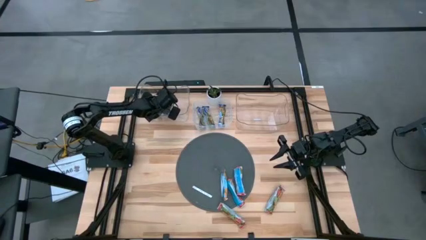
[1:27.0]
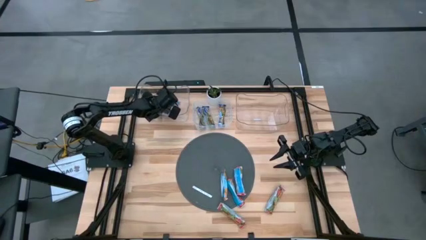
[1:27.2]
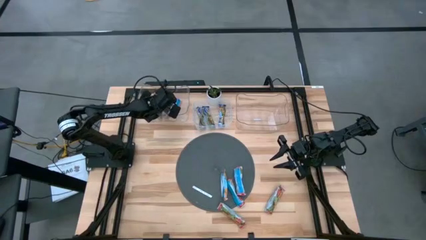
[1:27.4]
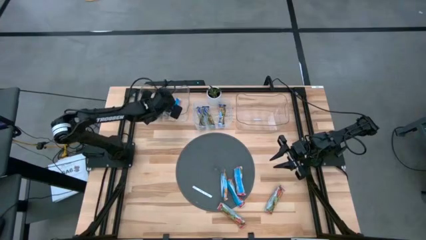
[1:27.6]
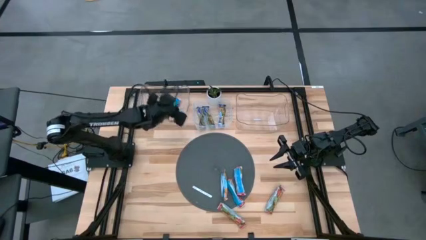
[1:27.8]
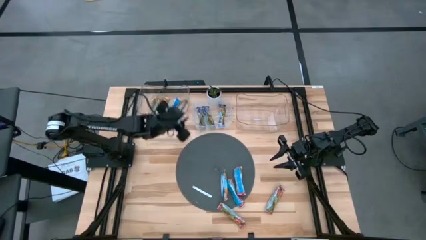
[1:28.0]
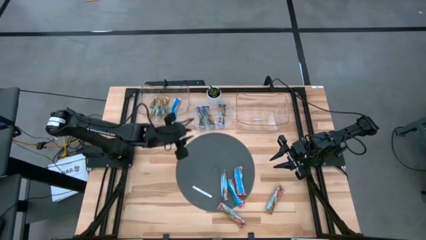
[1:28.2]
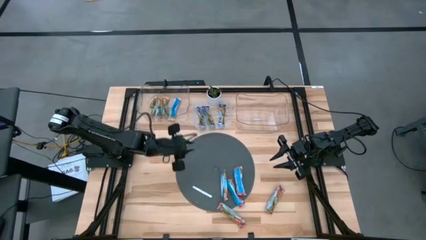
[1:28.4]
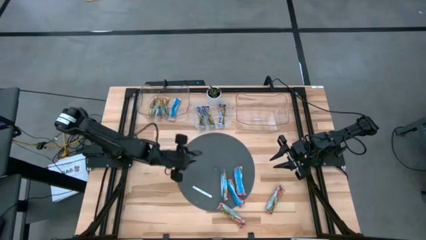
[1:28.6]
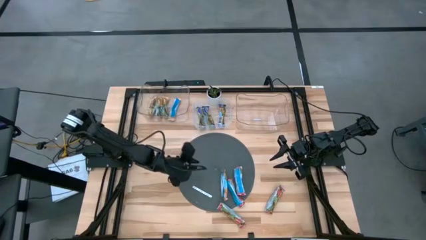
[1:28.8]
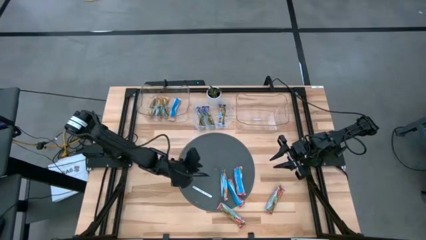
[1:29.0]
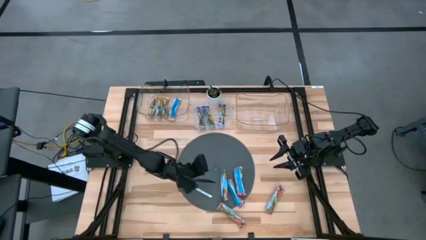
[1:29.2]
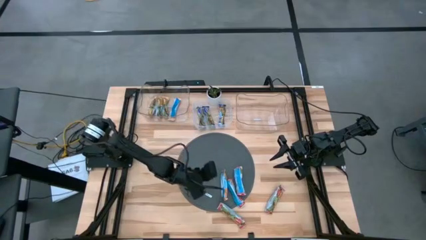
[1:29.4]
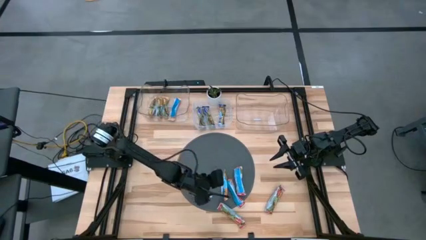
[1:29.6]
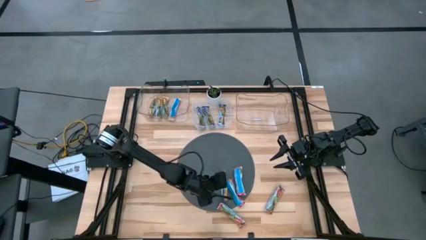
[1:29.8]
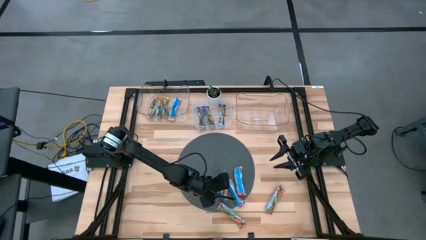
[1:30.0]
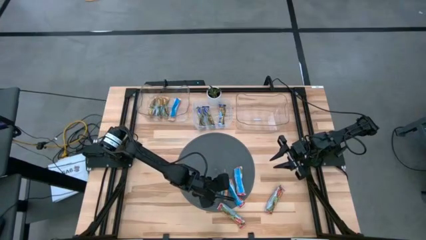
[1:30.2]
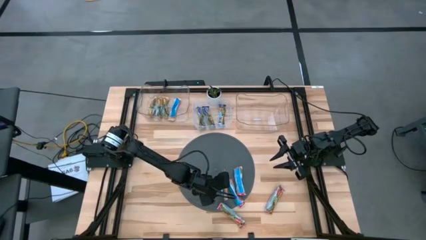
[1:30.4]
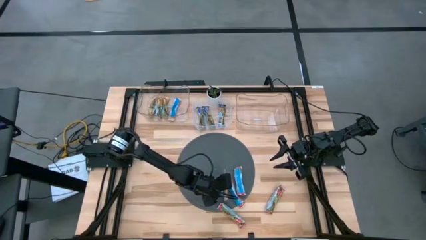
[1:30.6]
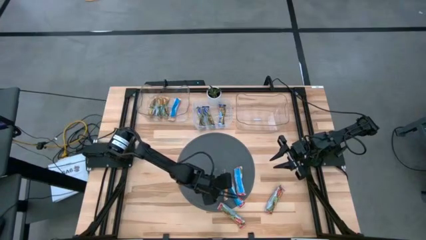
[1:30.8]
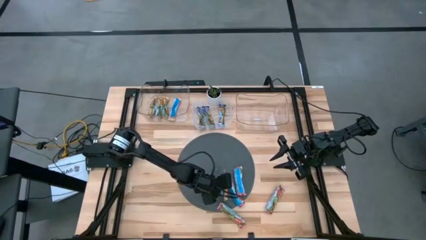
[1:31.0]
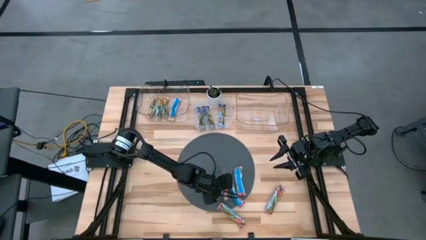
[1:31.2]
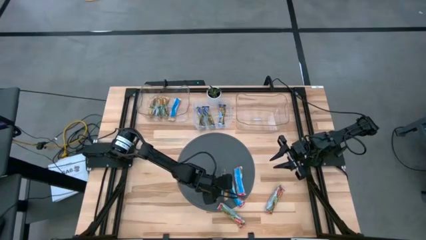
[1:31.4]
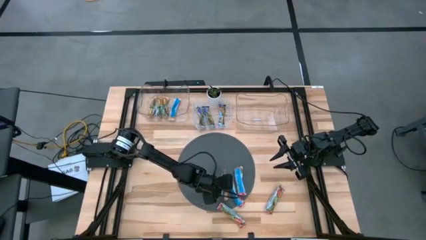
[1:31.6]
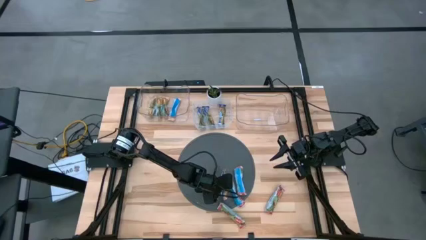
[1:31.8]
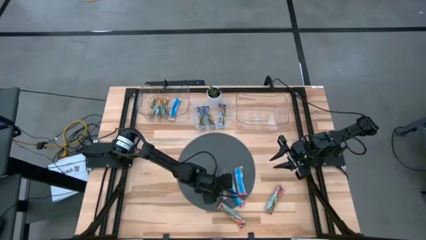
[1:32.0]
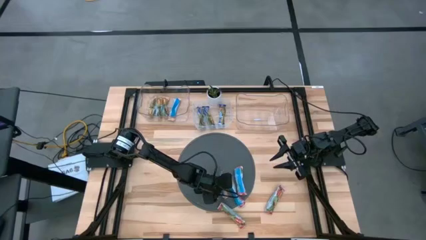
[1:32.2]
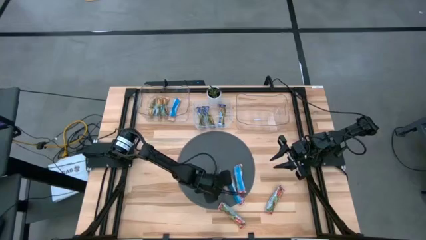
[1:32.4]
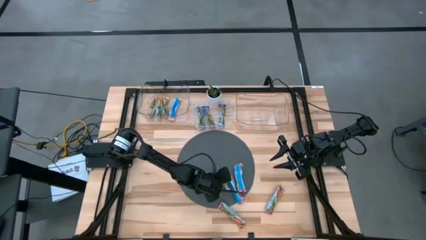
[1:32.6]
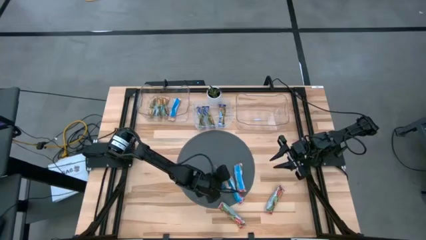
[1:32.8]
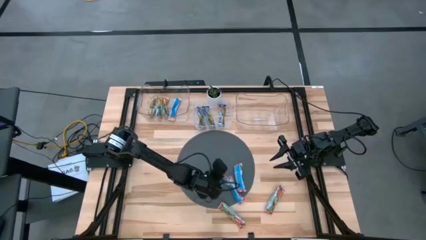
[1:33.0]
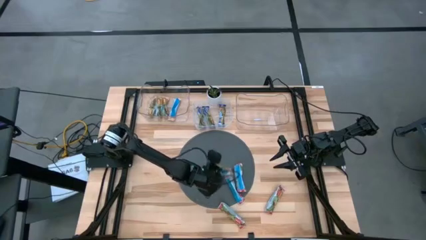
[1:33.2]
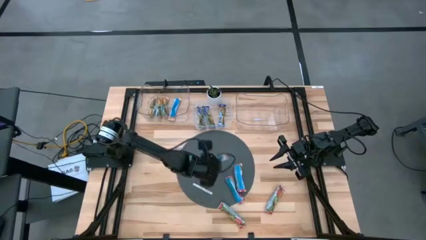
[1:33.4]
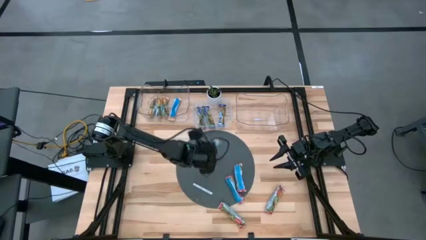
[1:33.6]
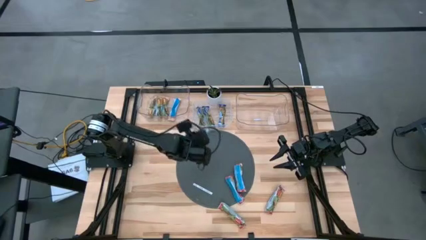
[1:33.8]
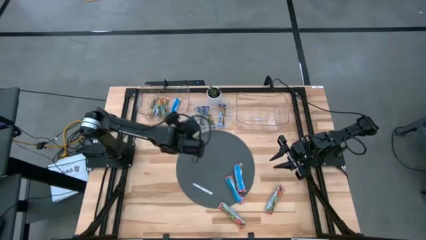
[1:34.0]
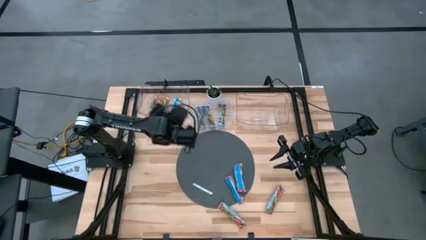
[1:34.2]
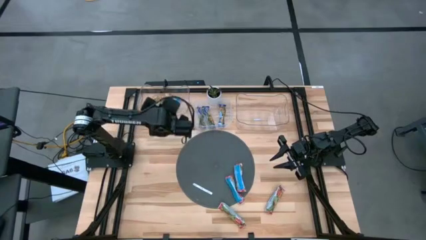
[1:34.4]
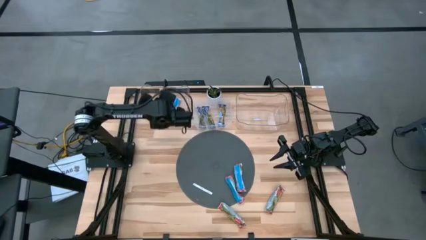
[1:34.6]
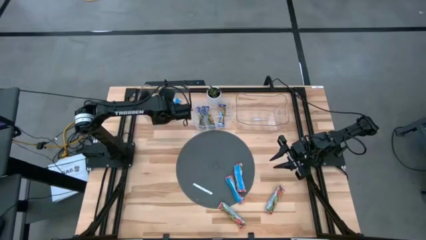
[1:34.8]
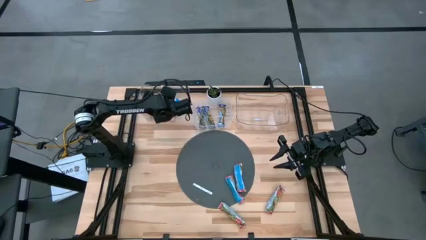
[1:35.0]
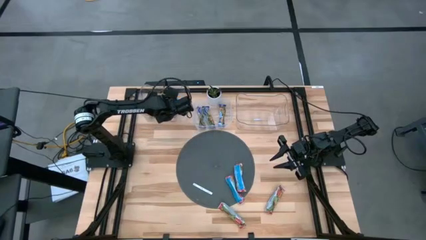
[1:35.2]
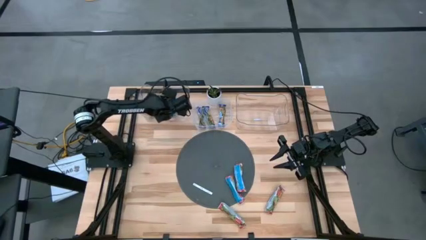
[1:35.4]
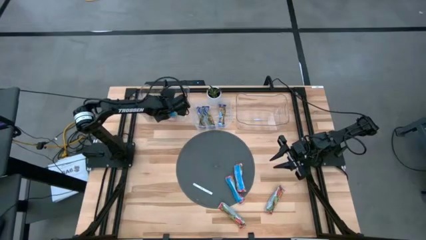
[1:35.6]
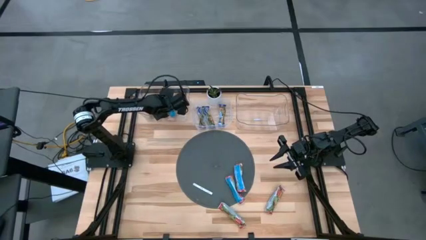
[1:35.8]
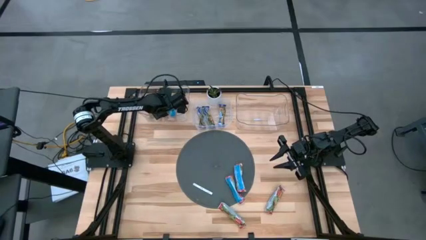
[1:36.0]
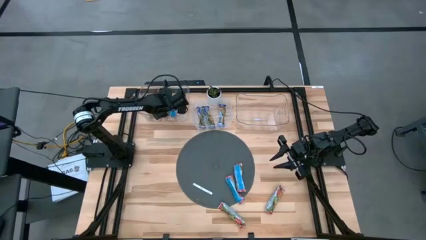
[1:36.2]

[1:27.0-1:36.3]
Task: Pick and place Granola Bars by type
Put the yellow granola bar into the left transparent bin

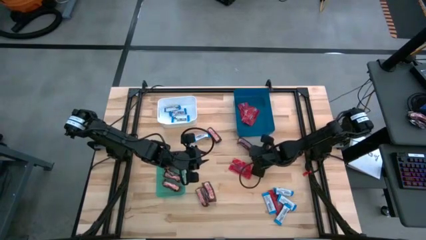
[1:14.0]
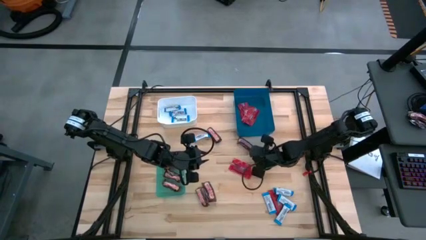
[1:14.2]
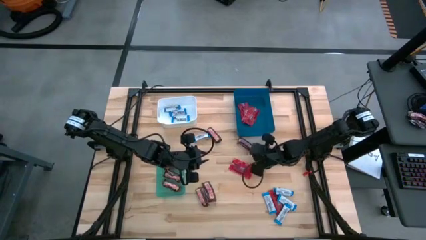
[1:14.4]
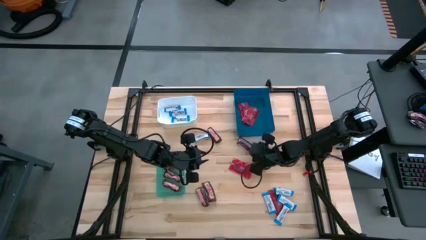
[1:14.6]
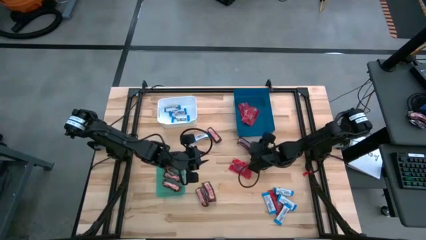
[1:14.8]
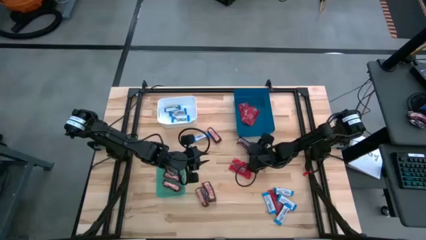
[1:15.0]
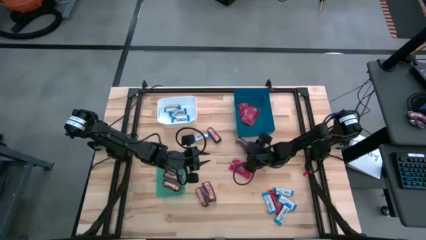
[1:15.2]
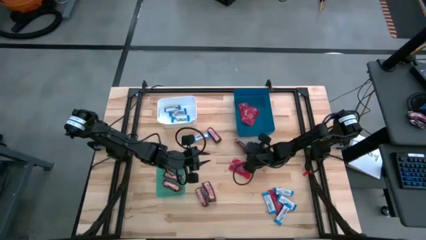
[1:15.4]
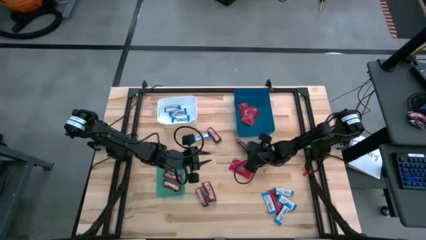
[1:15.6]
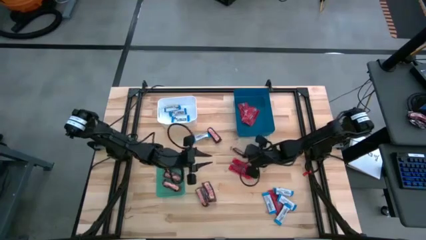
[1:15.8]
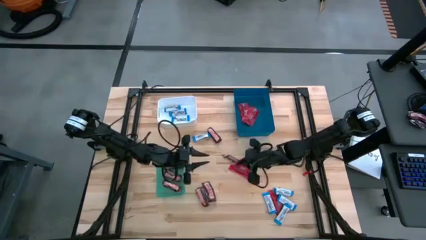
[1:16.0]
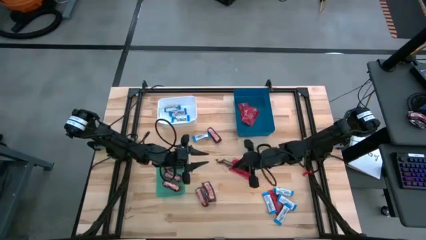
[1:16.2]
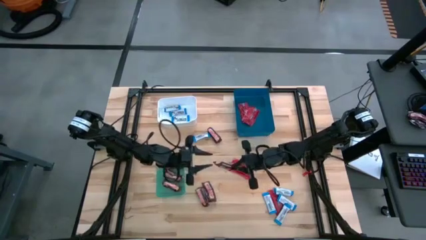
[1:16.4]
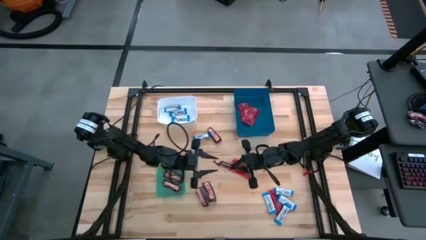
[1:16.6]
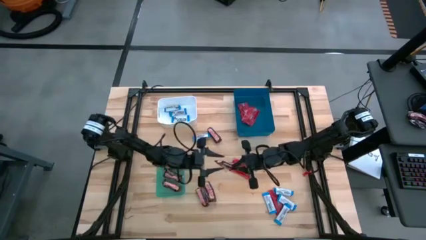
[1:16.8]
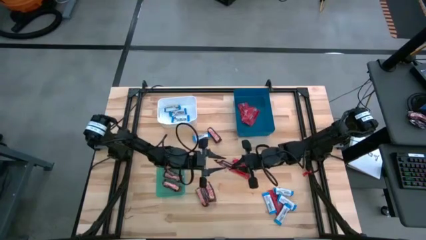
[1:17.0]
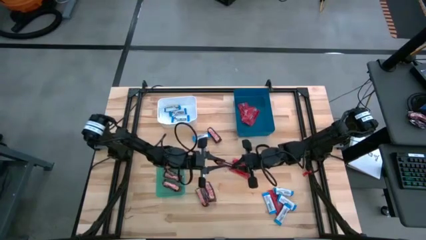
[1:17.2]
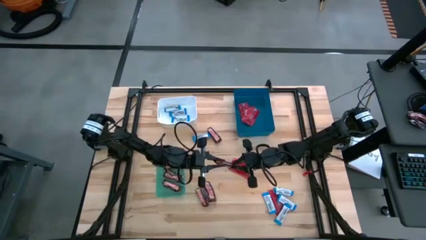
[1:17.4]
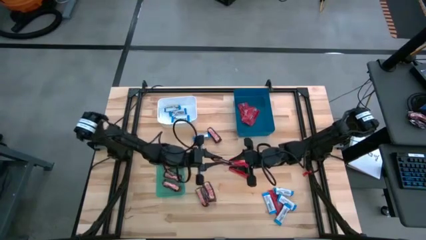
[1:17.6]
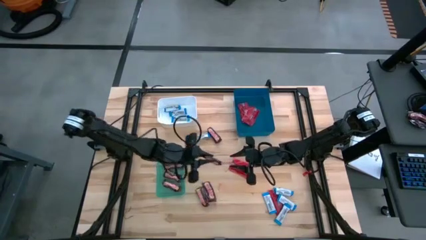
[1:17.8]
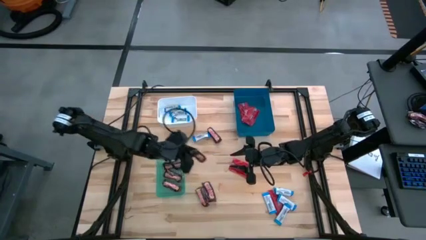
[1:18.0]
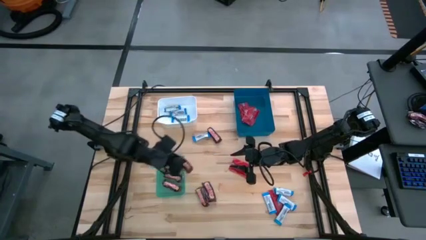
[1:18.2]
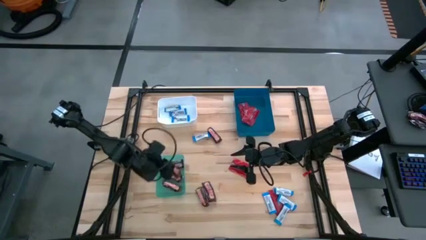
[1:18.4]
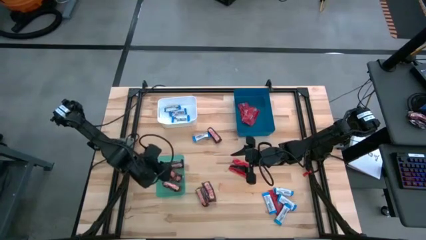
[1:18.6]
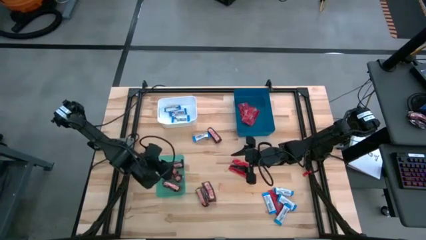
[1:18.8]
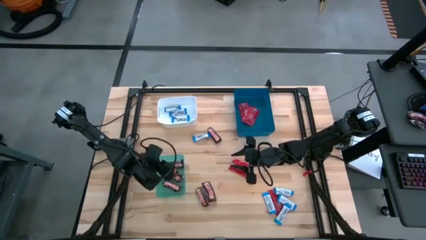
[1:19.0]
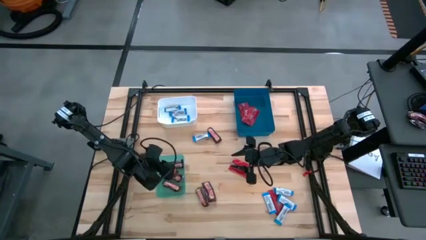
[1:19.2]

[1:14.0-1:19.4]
Task: Sort candy
Put the brown chocolate bar into the green bin

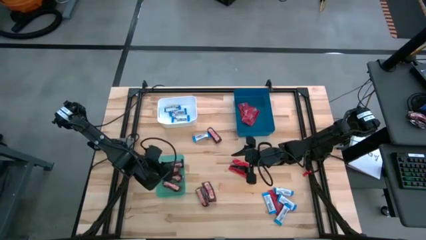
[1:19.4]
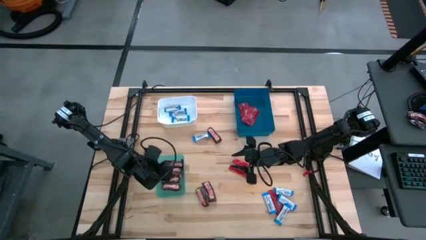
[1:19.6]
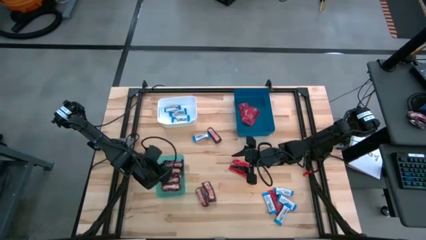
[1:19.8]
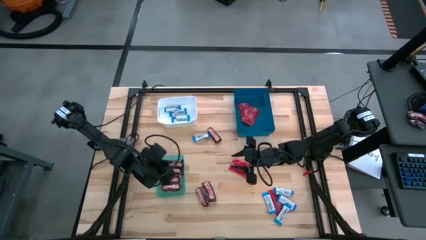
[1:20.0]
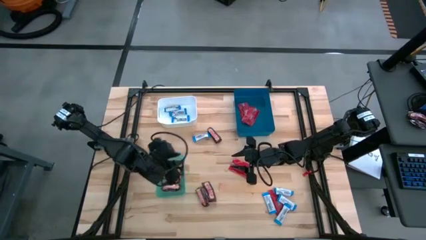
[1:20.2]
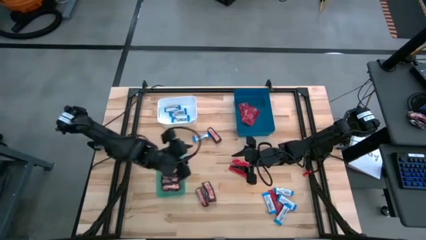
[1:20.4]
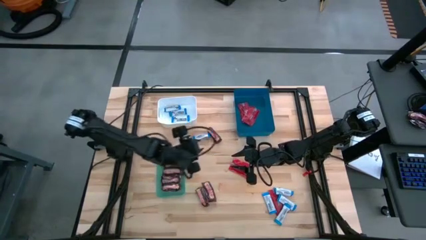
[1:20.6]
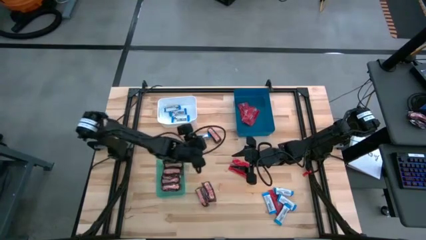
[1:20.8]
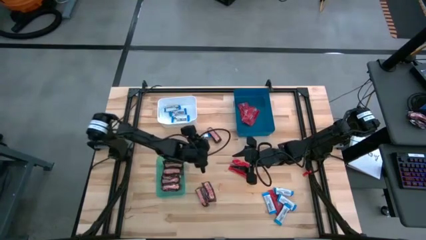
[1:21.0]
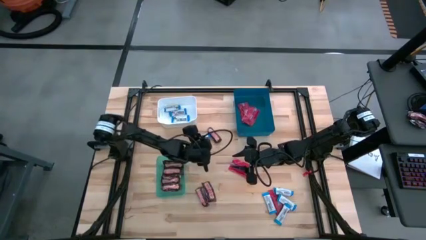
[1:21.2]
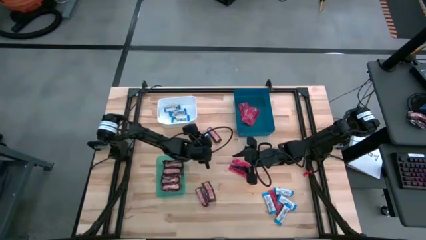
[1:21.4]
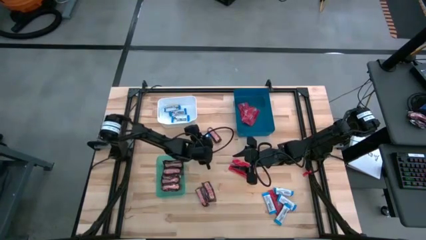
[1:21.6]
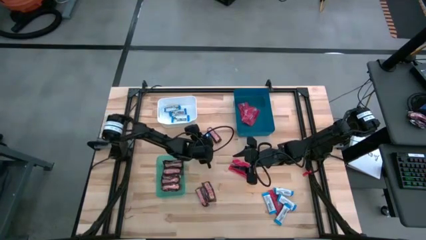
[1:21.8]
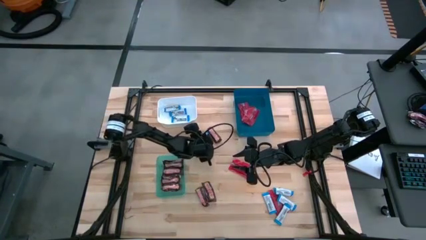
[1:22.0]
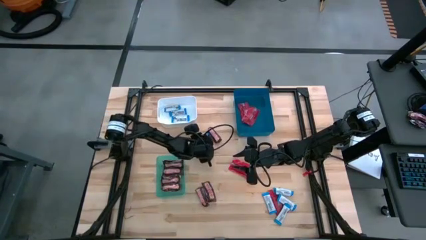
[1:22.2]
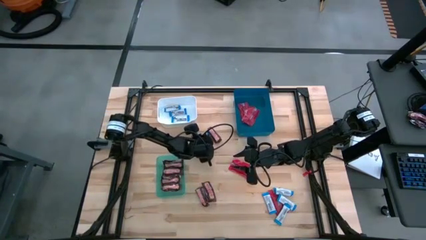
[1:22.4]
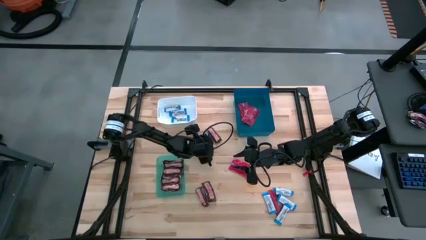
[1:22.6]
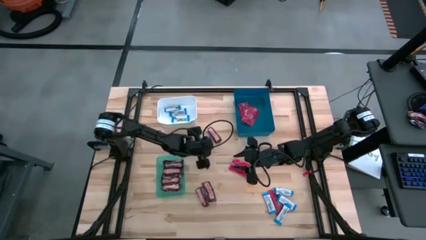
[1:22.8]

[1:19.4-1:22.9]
Put the white chocolate bar into the white bin
